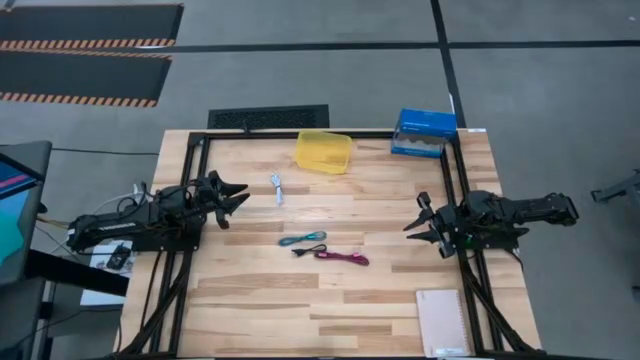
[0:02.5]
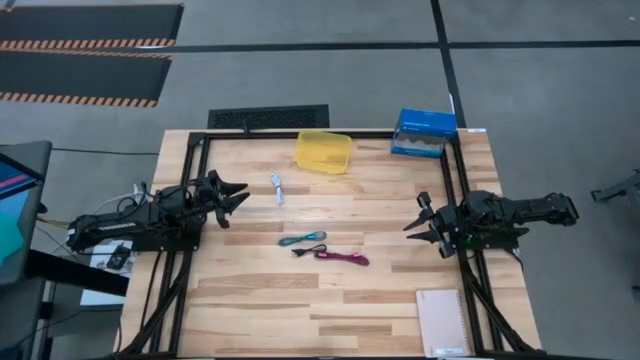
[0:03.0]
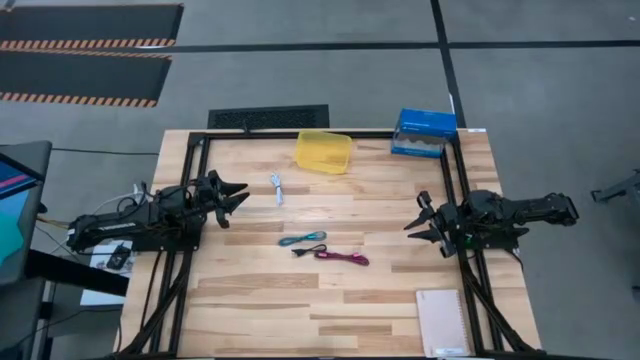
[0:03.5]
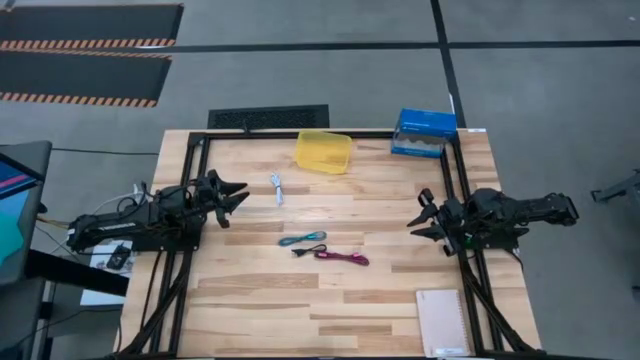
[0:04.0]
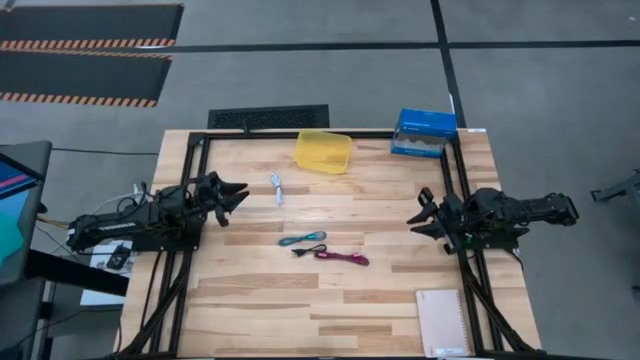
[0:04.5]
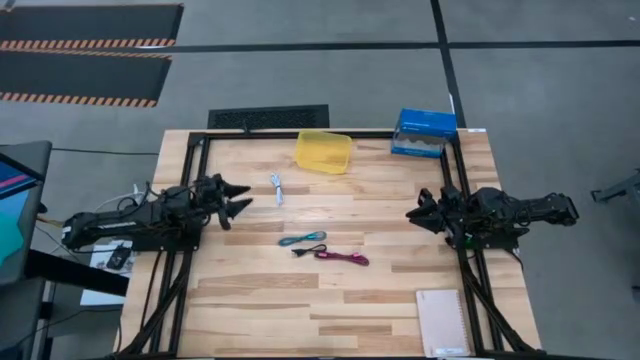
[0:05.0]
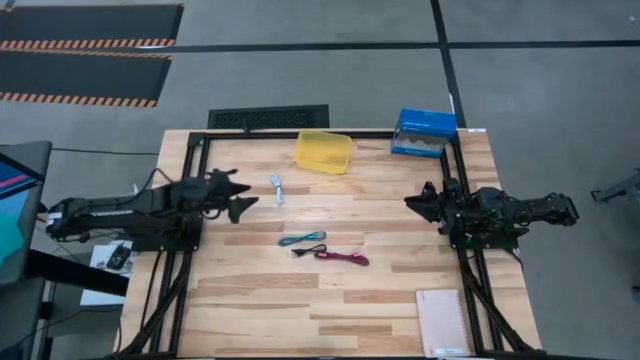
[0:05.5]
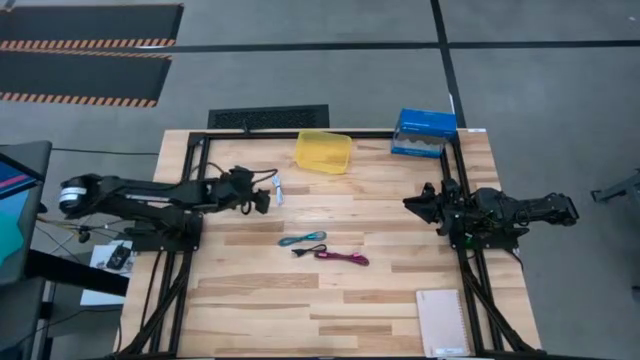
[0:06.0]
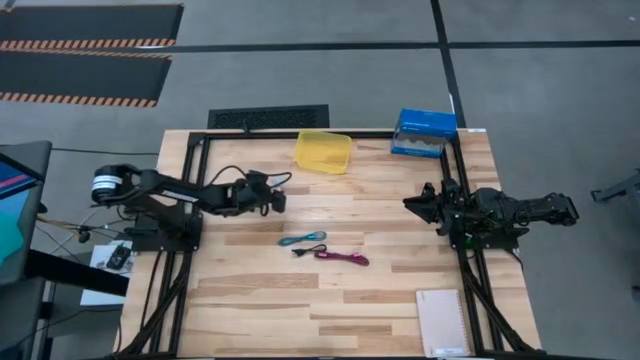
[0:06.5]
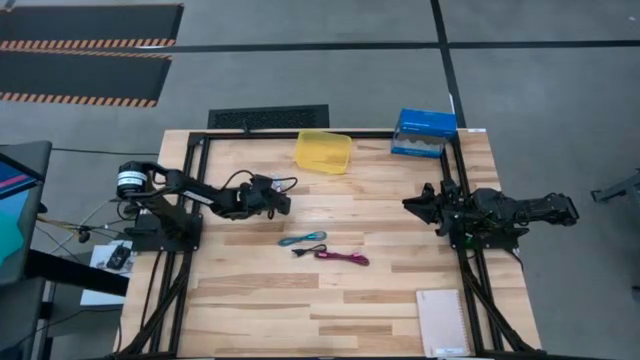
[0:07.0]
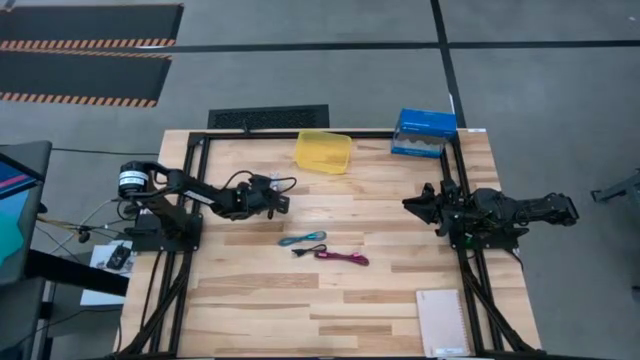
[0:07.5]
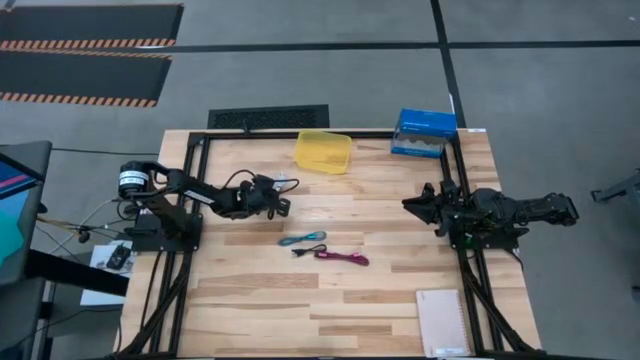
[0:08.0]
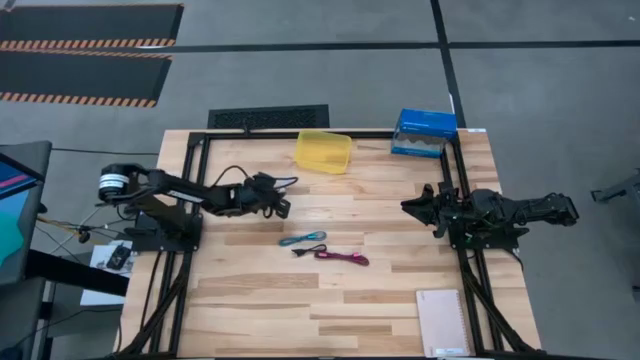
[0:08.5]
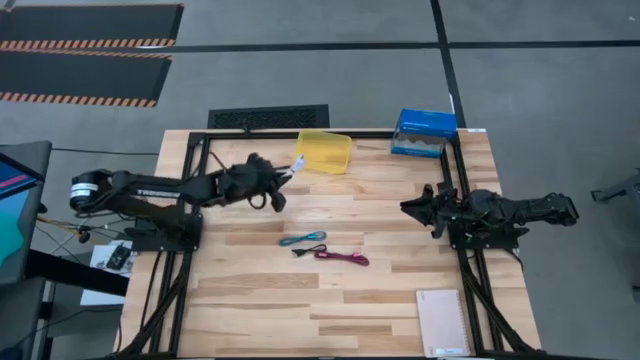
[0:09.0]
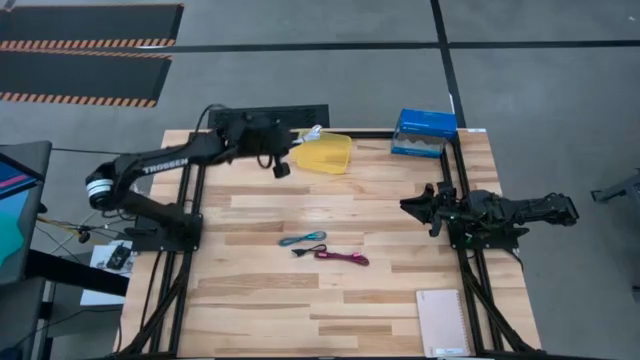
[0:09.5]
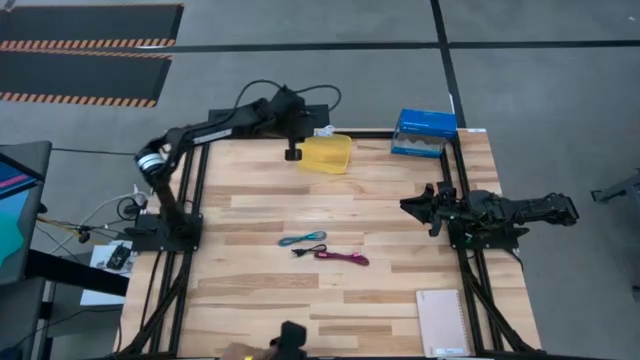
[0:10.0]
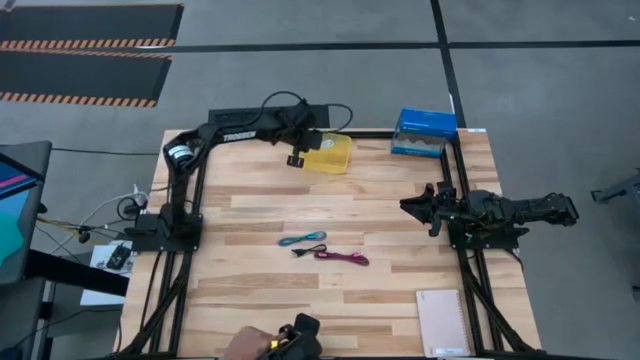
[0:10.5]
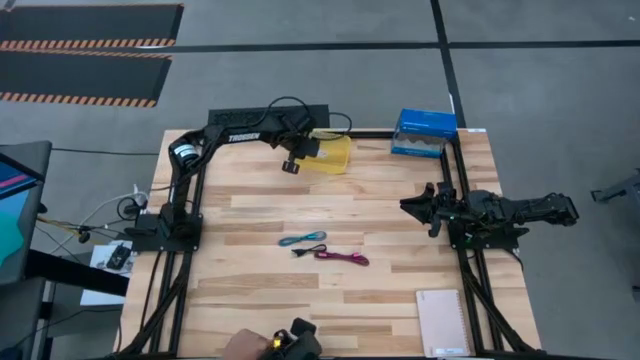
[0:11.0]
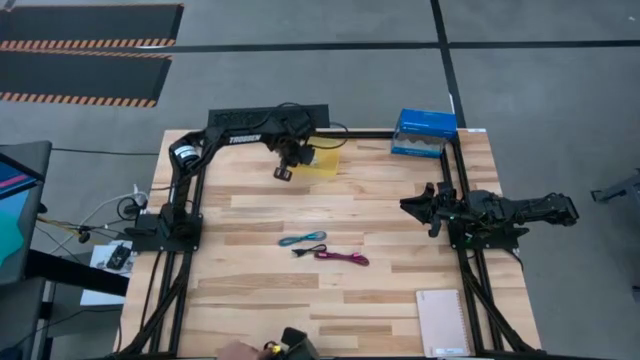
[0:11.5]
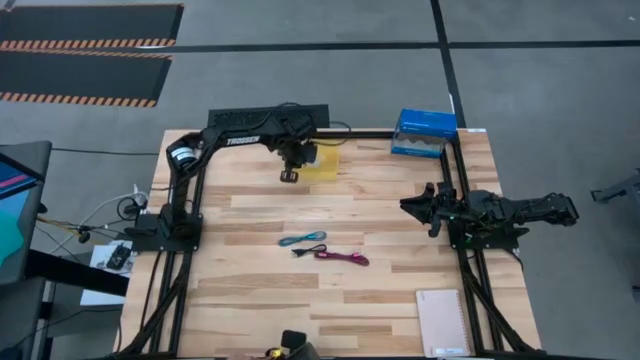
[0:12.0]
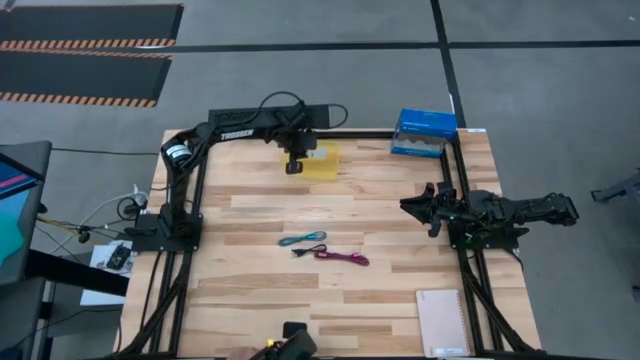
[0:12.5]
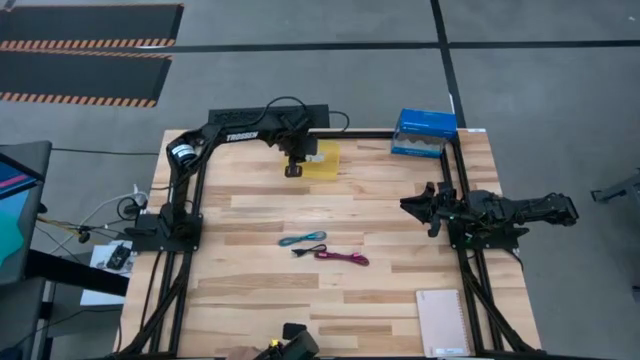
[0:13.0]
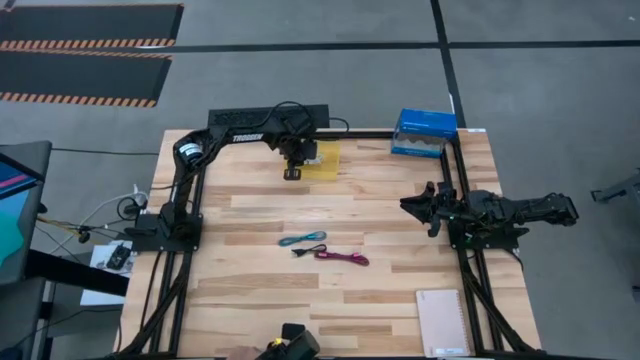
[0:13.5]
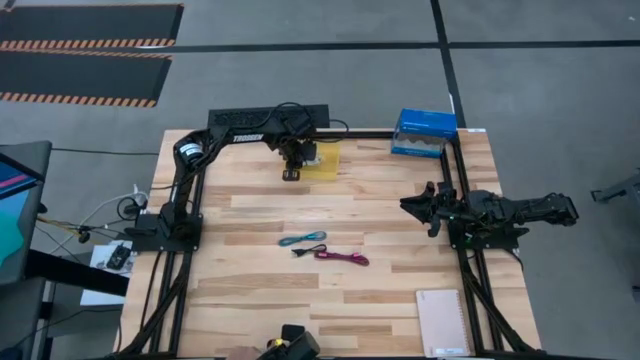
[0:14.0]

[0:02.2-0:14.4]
Task: Pick and place USB-C Cables
Put the white charger cable into the yellow bin
